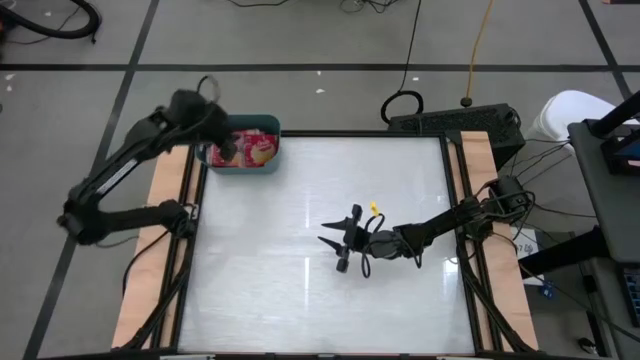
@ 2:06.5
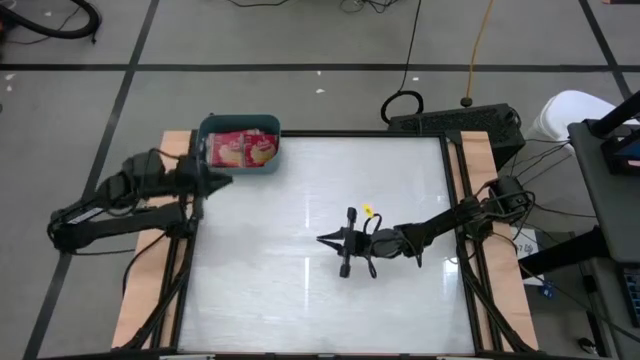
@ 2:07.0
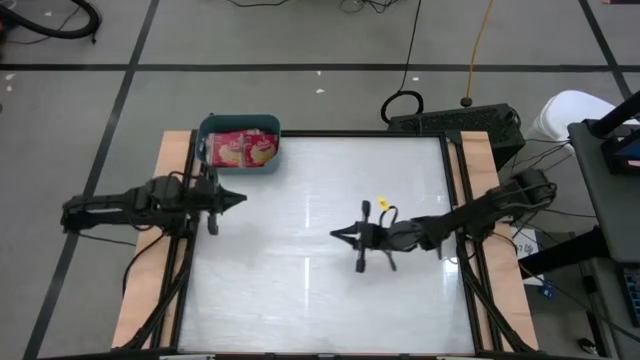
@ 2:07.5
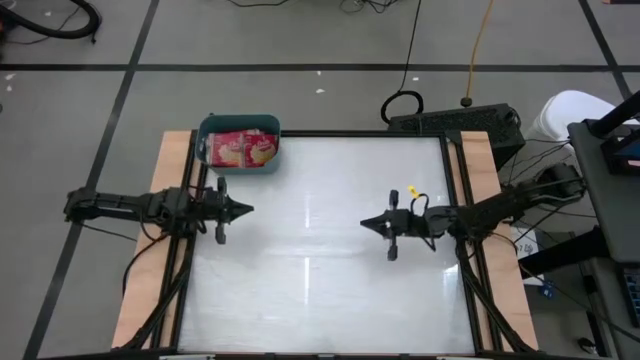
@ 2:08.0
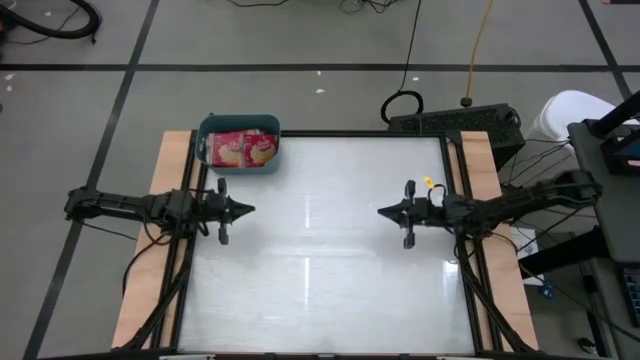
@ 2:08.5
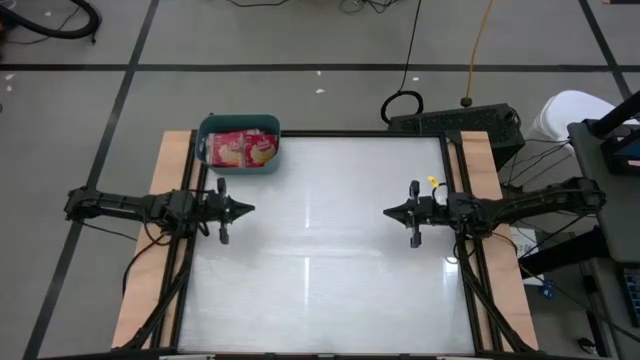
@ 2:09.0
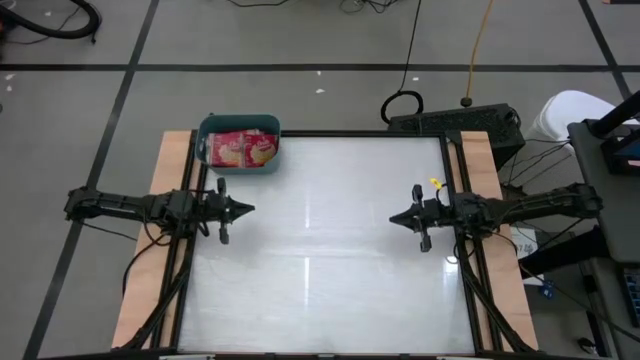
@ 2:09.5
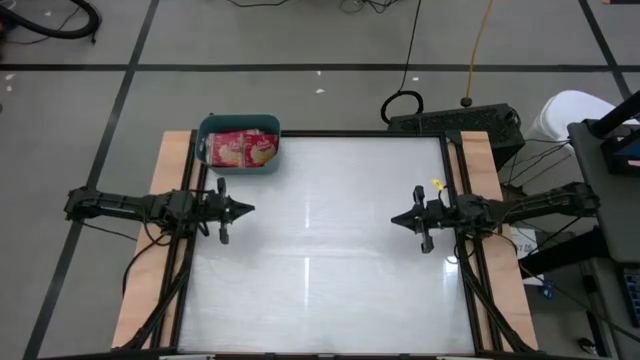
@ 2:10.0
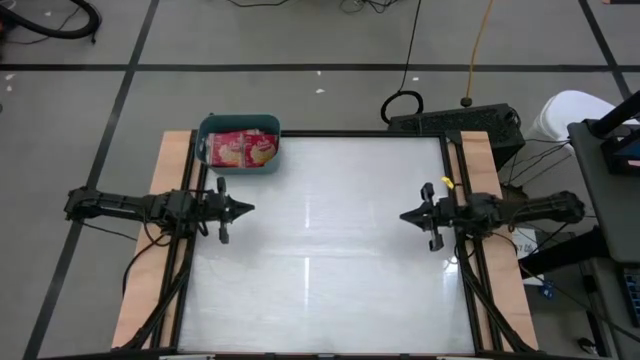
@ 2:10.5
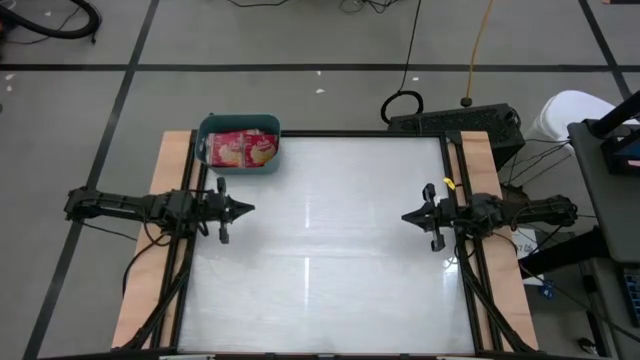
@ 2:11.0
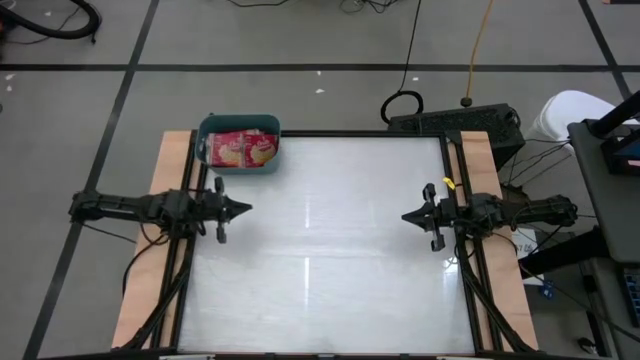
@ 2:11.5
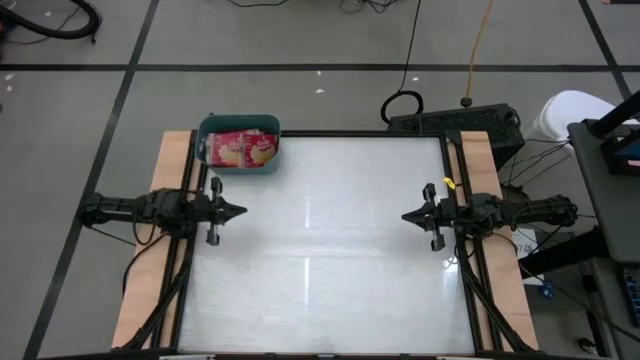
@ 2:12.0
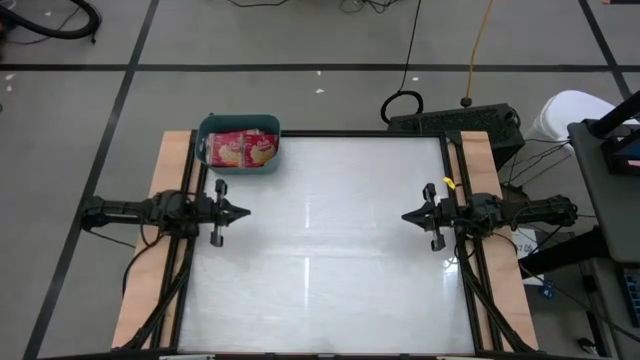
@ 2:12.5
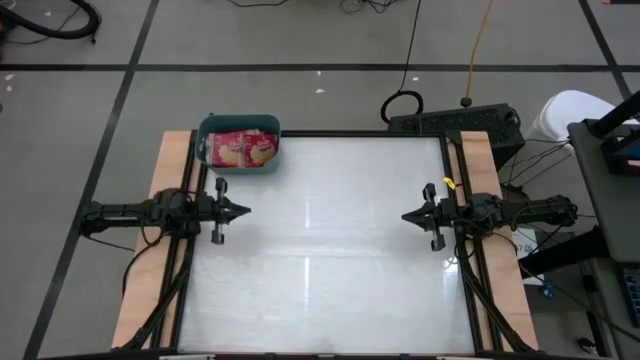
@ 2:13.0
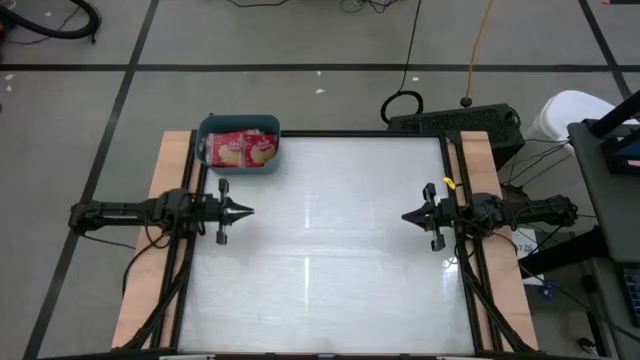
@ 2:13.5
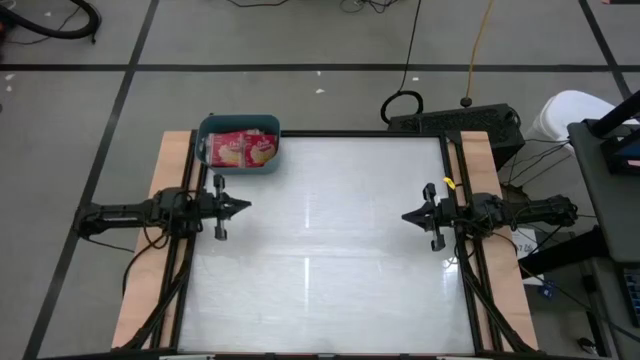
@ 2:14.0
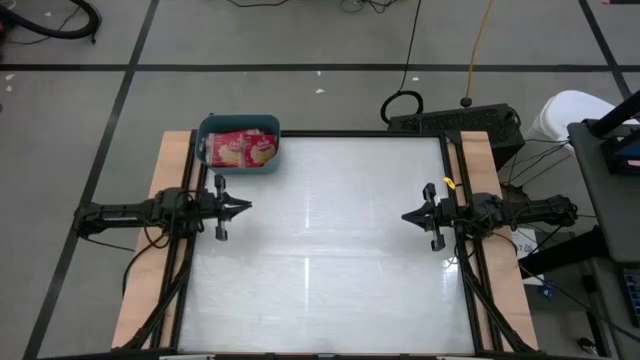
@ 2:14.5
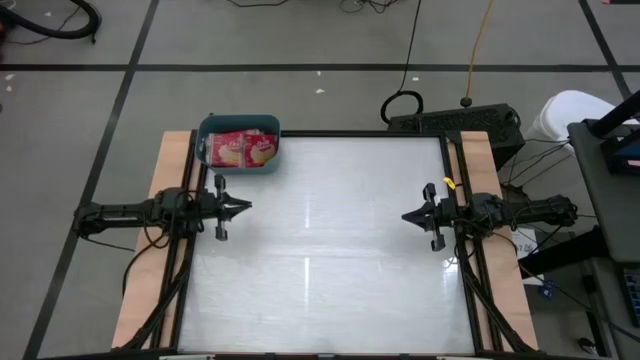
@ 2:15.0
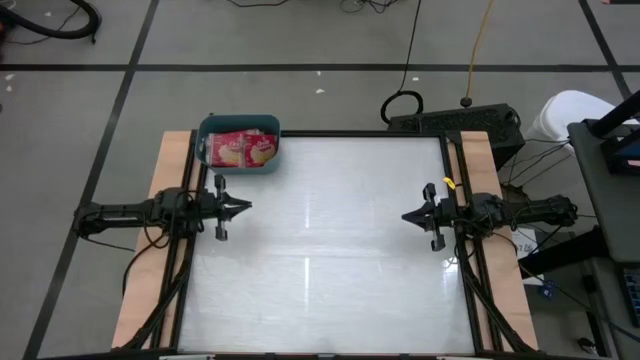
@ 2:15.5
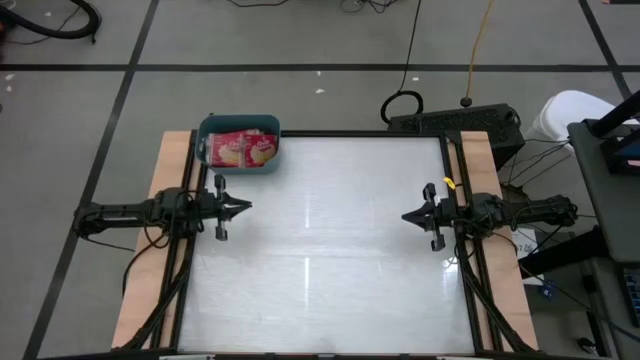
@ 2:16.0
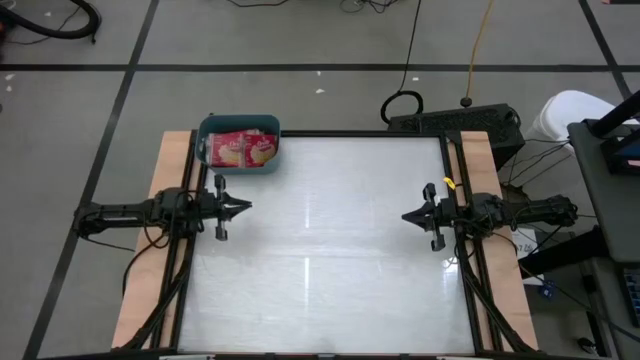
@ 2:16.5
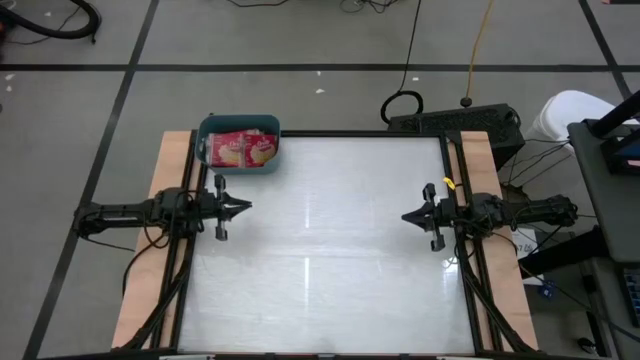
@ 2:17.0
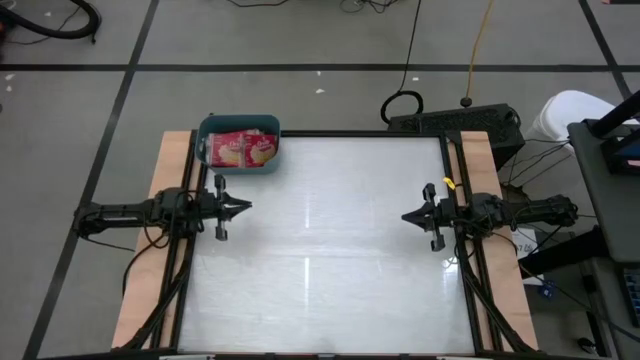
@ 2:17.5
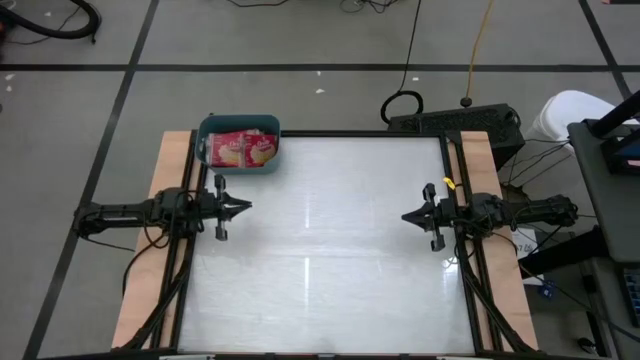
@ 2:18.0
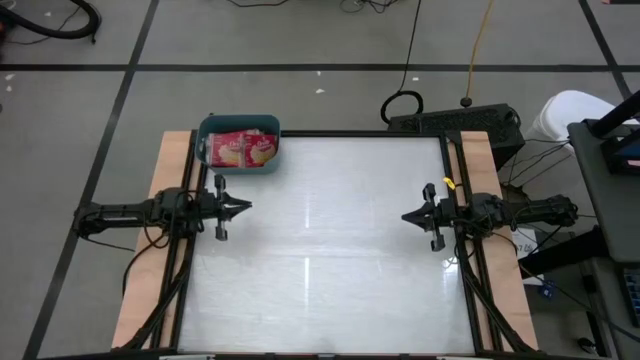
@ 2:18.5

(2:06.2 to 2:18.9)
Task: Sort popcorn bags into baskets
Return to Home Position

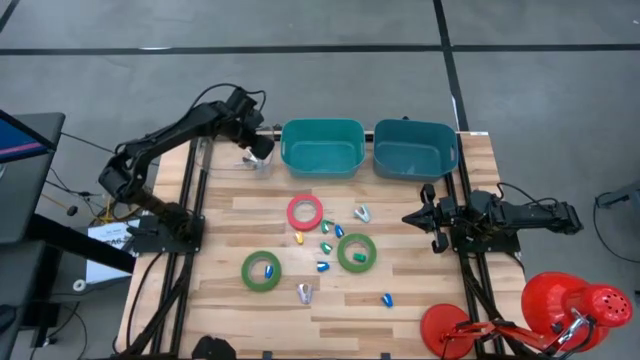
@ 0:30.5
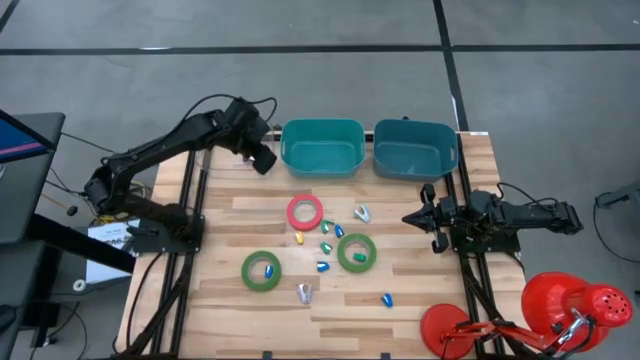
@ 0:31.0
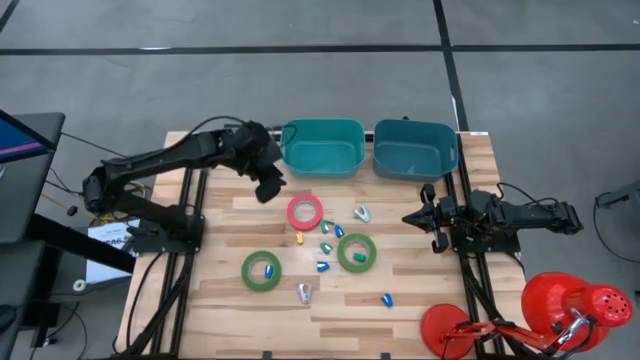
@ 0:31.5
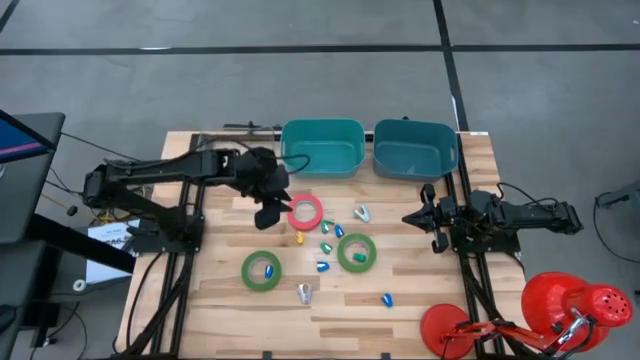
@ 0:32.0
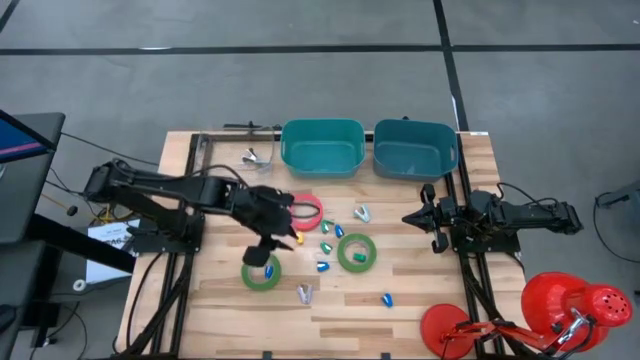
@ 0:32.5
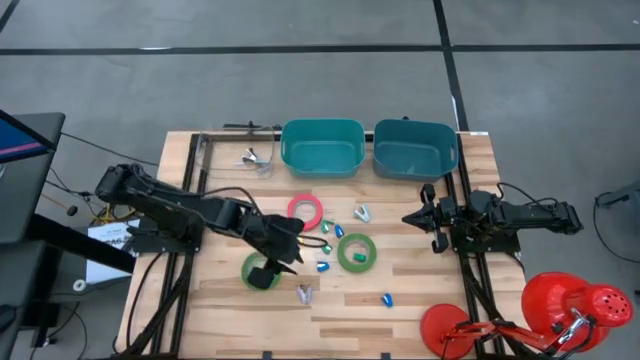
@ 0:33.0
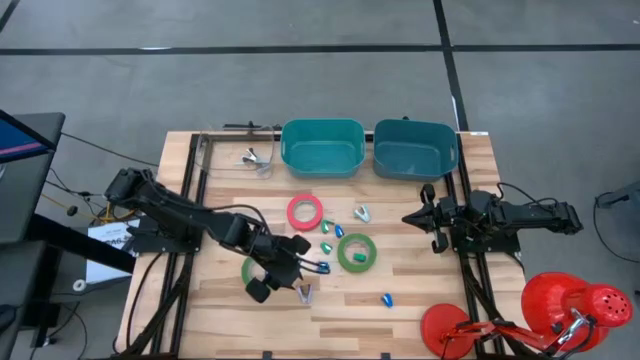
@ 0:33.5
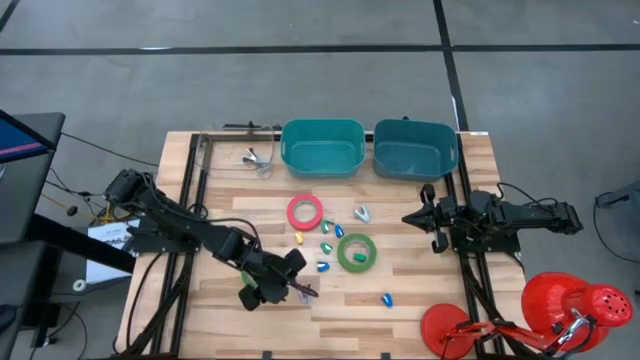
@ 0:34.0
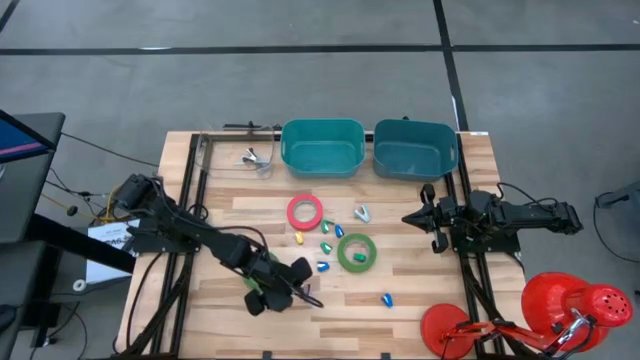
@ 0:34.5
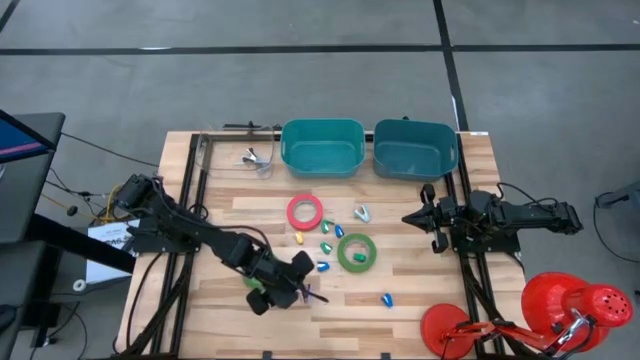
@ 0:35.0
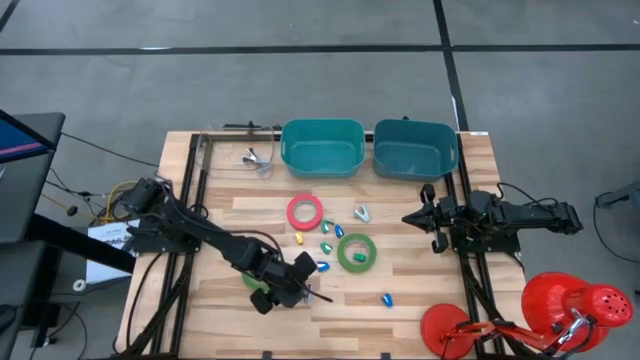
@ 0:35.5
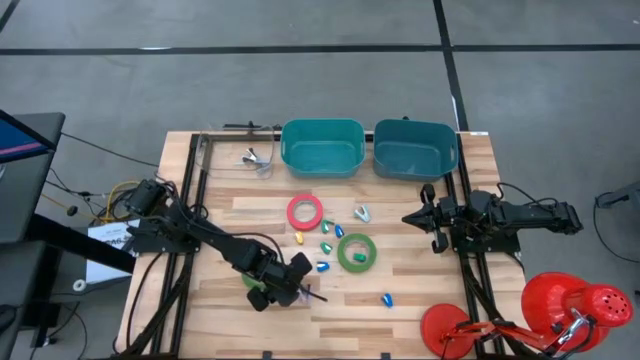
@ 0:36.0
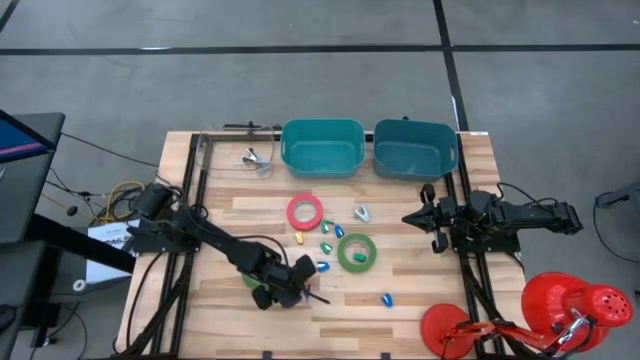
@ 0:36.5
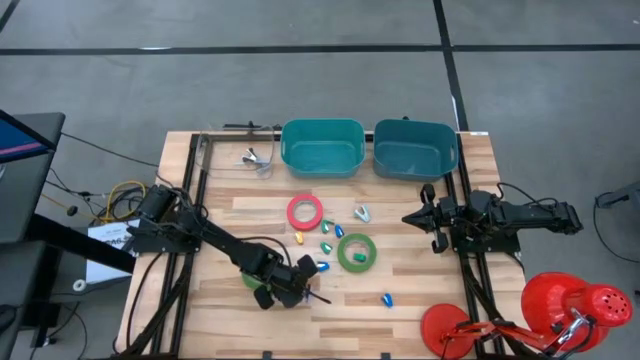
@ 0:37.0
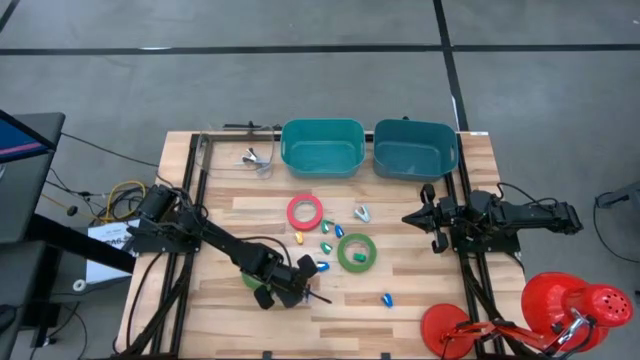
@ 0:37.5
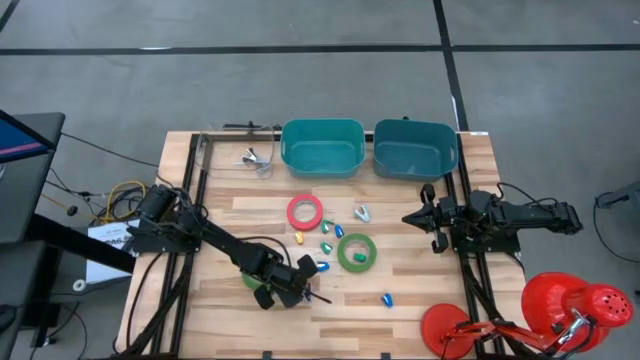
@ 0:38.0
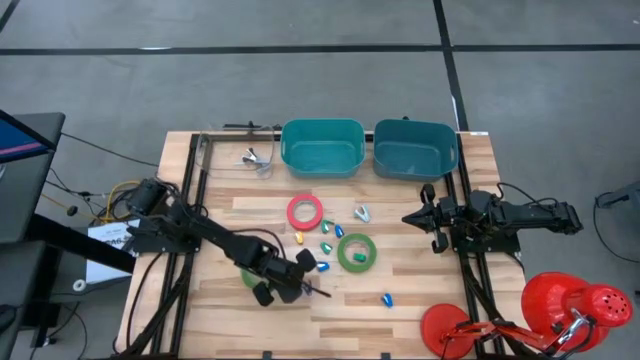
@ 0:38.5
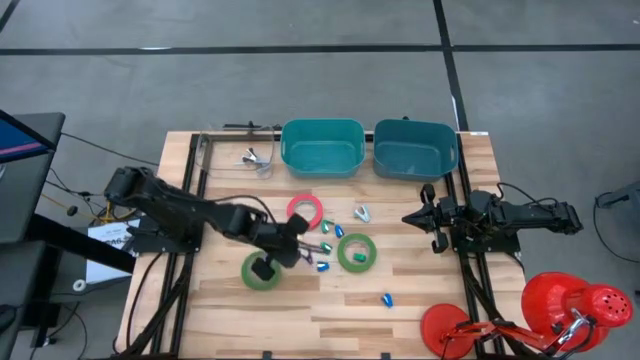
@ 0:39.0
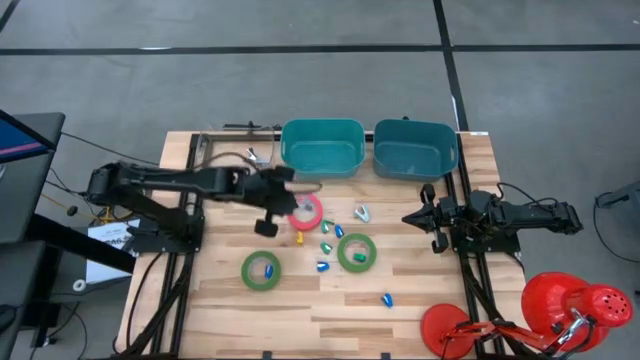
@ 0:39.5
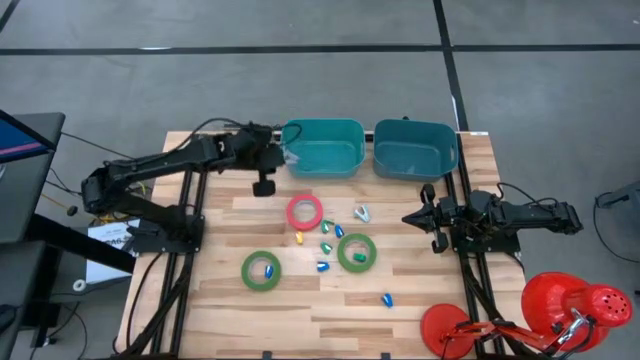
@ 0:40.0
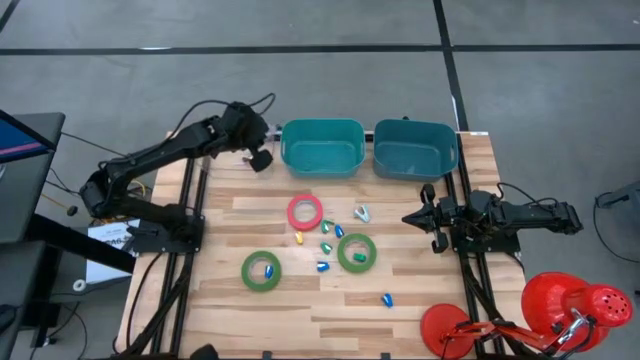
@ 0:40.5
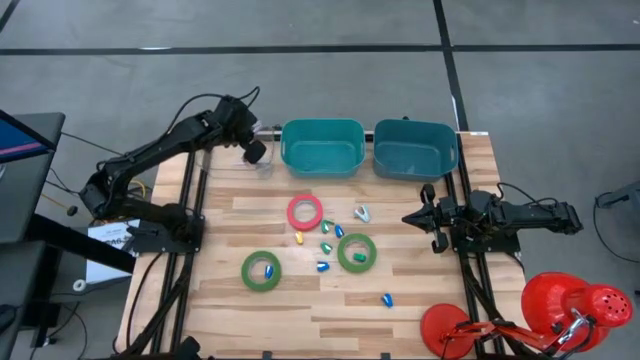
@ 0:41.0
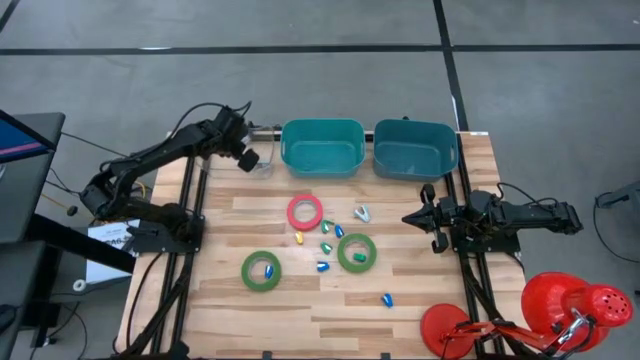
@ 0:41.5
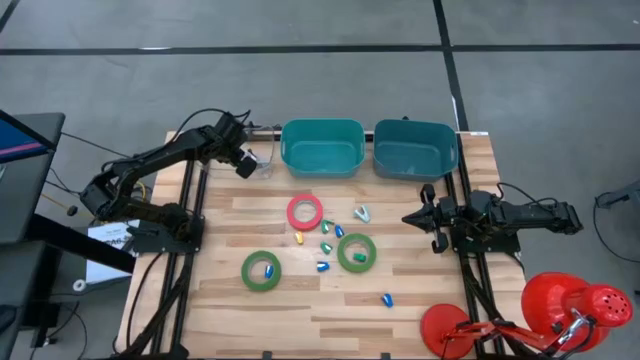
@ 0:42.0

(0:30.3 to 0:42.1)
Task: Pick and place Stapler, Stapler remover, tape
Put the purple staple remover into the transparent bin
